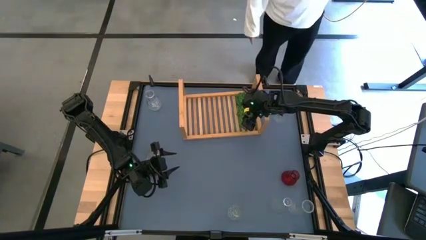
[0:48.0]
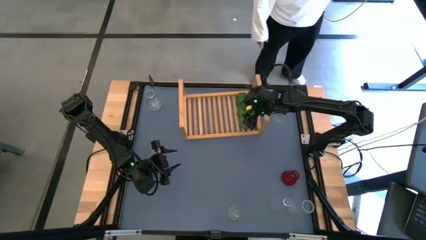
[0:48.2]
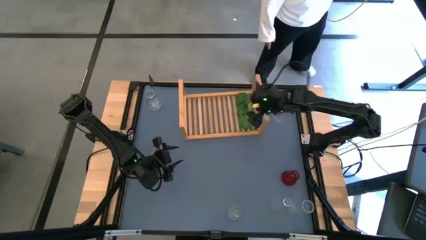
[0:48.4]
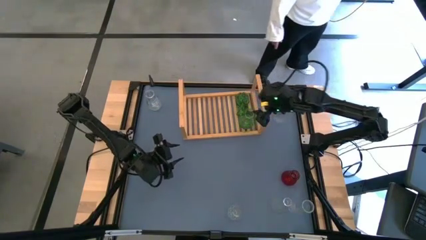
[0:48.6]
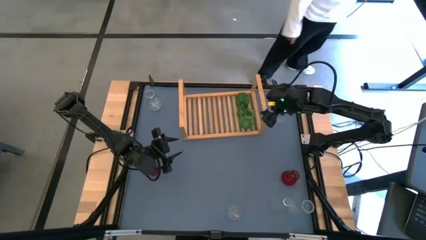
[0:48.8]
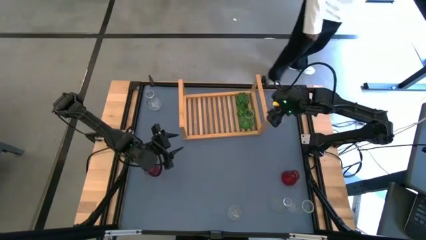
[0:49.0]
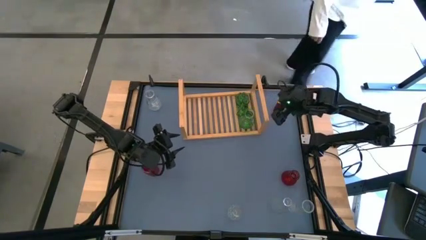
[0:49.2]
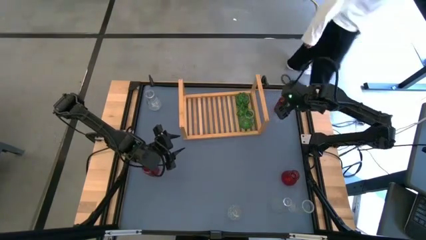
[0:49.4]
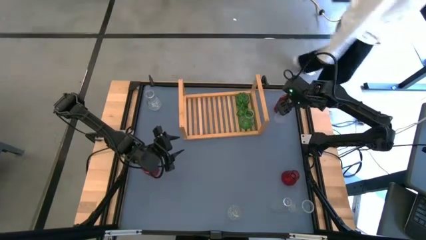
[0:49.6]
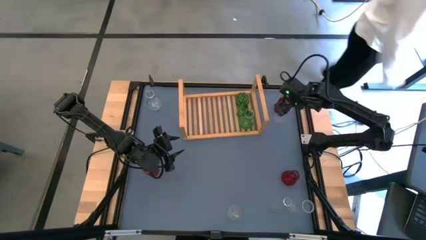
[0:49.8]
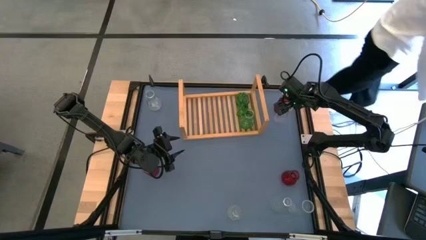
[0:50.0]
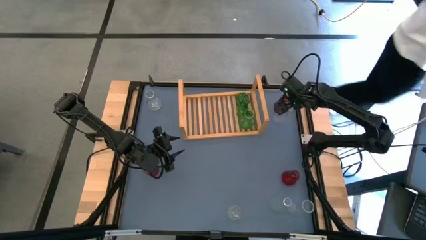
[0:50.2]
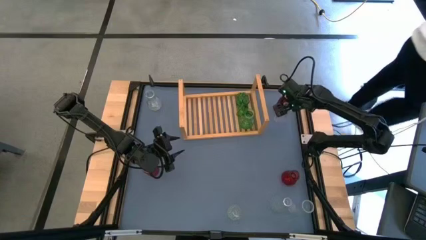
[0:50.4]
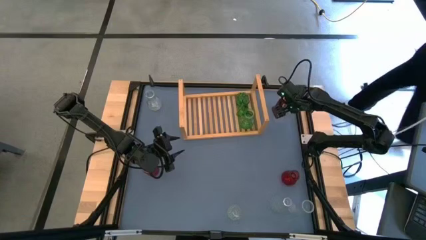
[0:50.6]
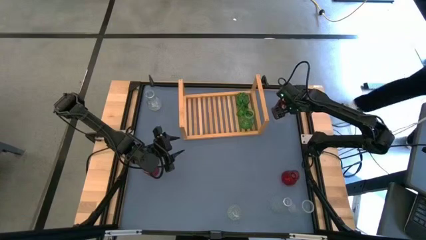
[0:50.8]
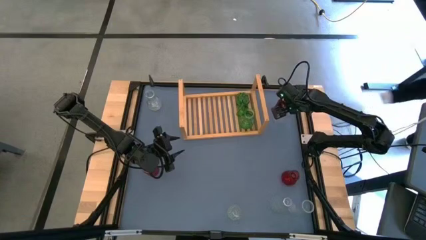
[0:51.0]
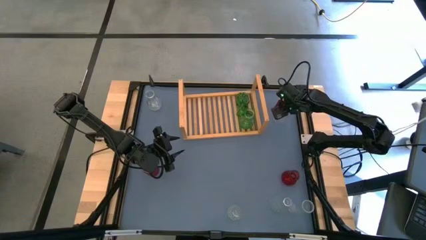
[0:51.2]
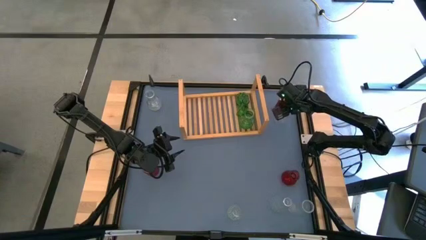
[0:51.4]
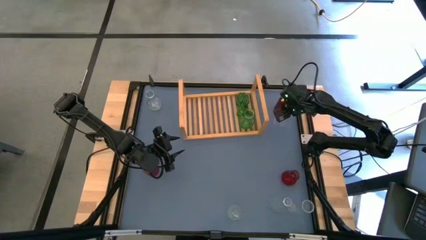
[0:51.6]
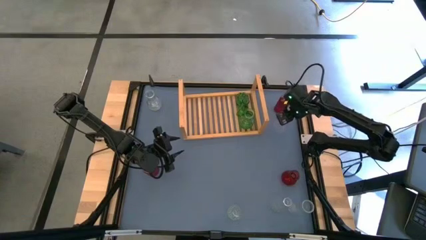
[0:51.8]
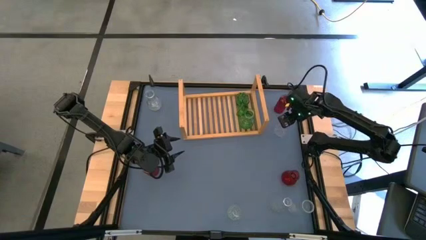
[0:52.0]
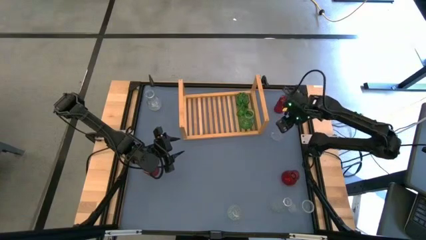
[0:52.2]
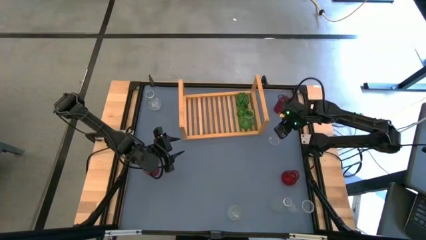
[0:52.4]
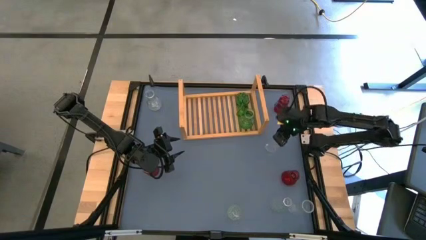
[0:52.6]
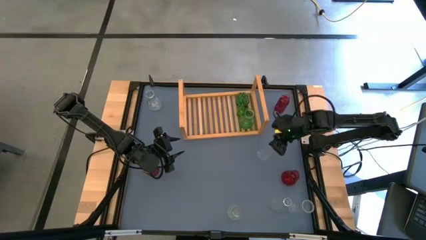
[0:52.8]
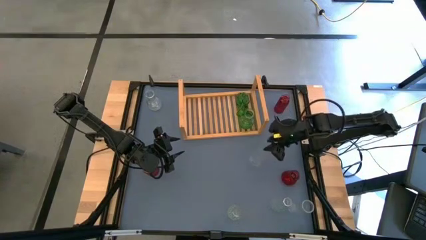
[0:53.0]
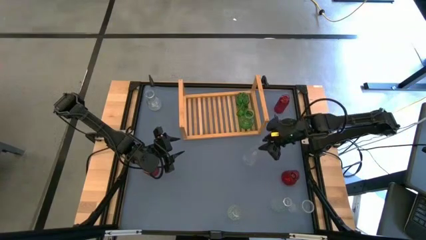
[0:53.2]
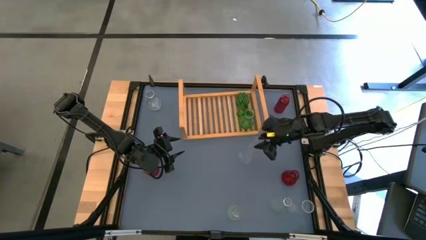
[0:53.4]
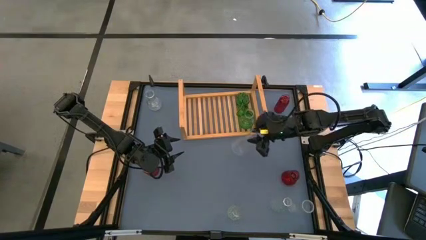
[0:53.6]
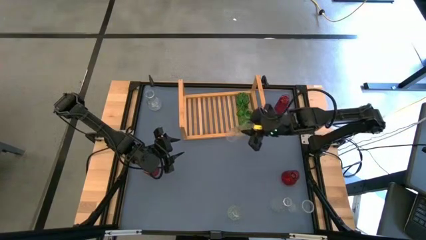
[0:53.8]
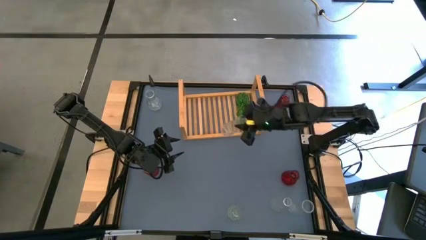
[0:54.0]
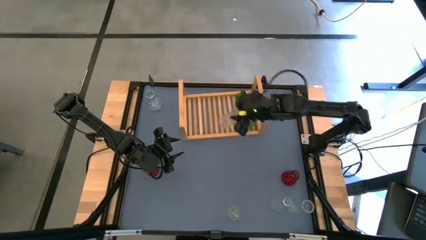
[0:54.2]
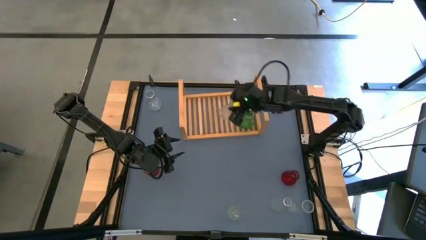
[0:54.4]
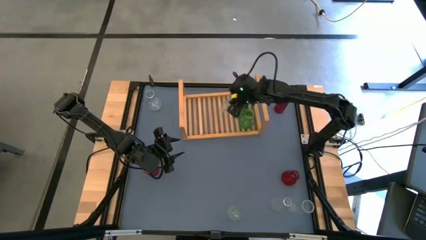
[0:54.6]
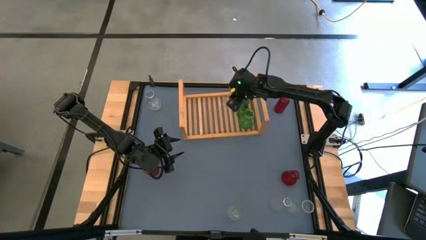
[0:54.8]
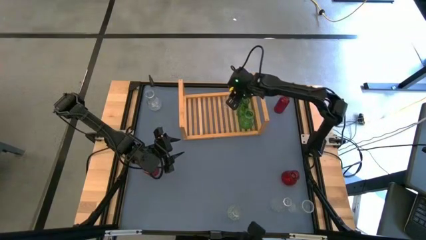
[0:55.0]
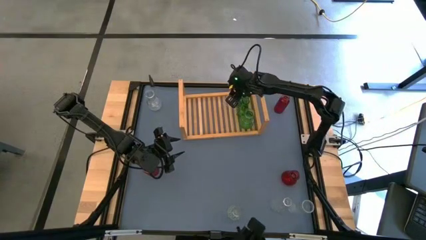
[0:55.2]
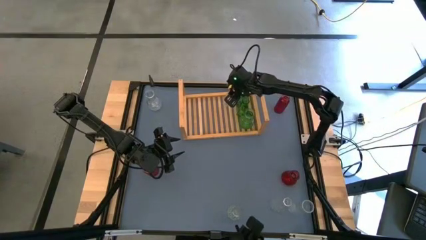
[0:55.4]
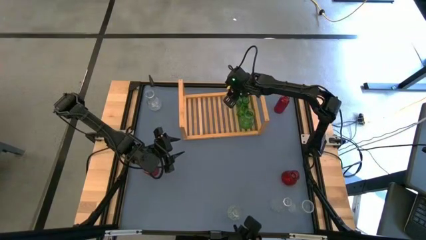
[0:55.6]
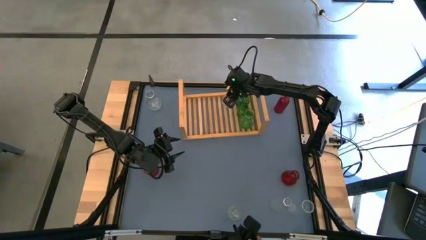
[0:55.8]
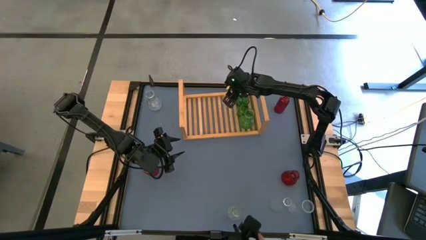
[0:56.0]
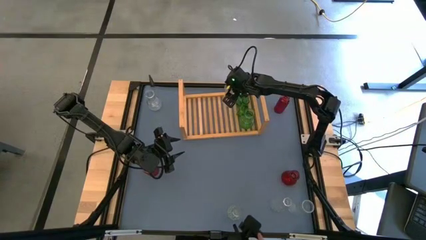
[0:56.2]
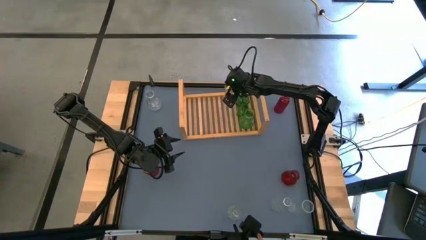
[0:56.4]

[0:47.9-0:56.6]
Task: sort vases onto shelf
Put the transparent vase on the shelf

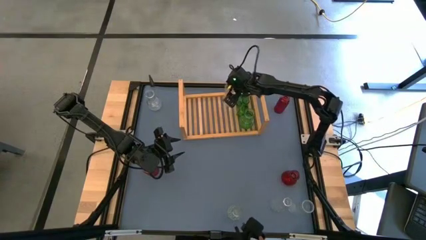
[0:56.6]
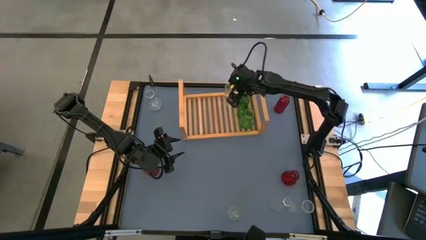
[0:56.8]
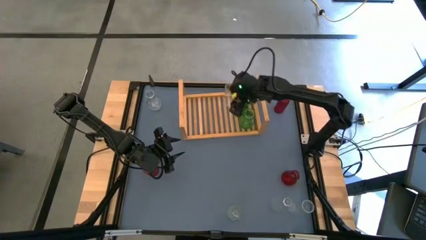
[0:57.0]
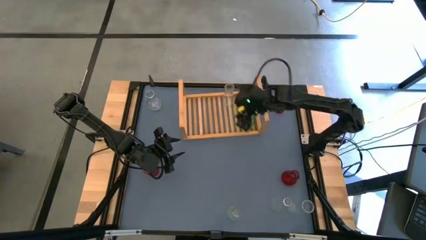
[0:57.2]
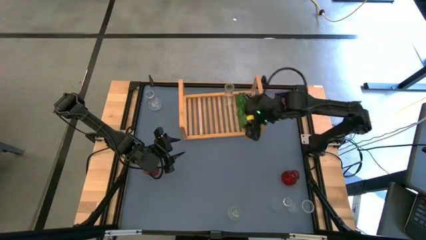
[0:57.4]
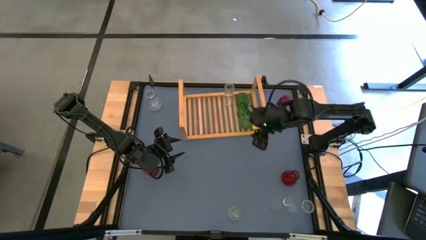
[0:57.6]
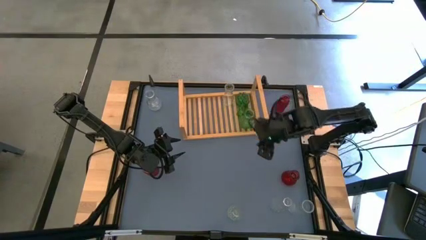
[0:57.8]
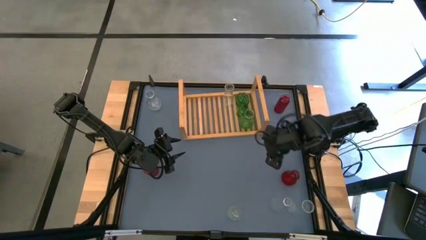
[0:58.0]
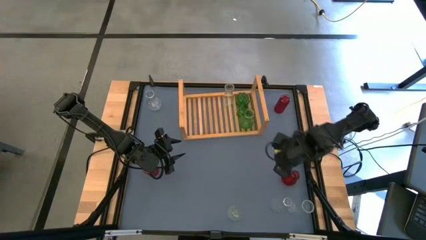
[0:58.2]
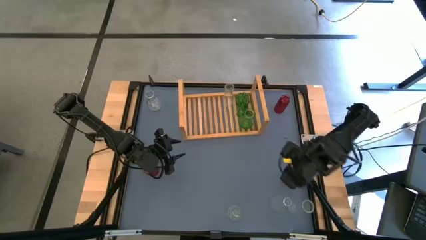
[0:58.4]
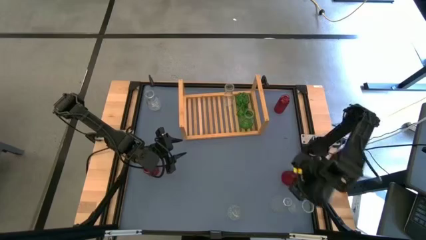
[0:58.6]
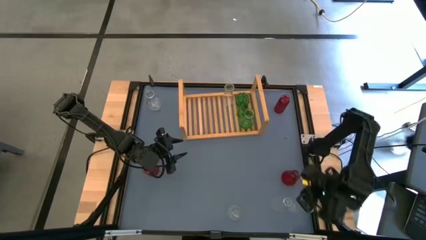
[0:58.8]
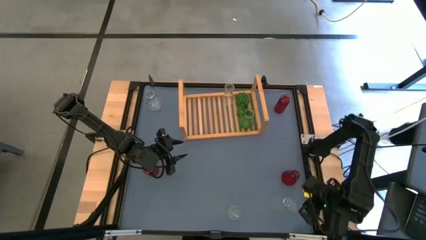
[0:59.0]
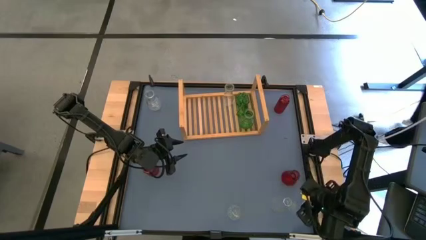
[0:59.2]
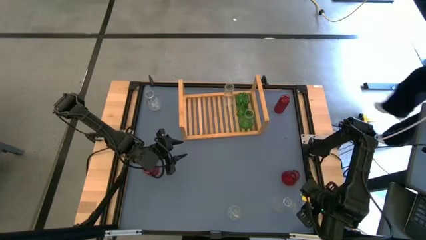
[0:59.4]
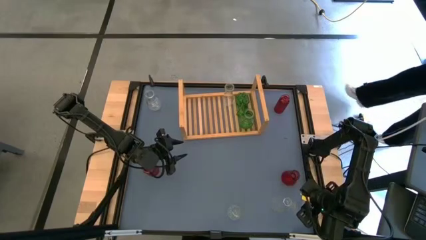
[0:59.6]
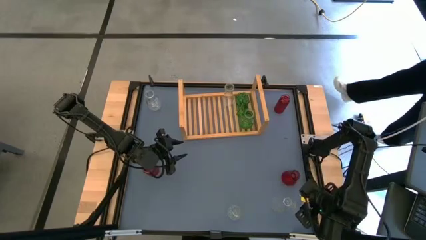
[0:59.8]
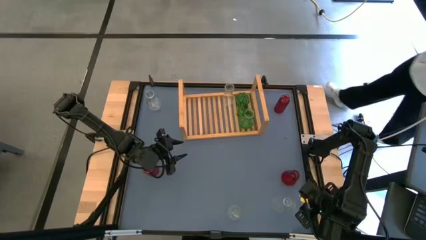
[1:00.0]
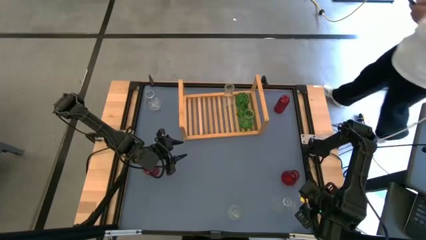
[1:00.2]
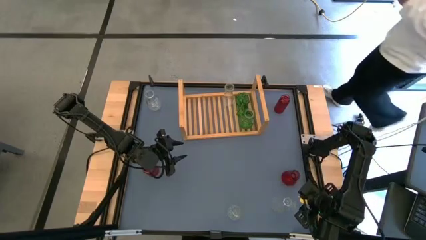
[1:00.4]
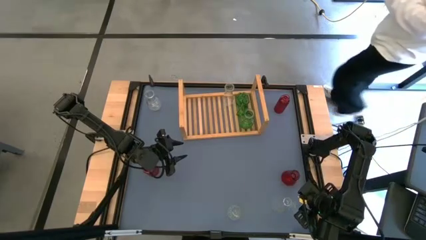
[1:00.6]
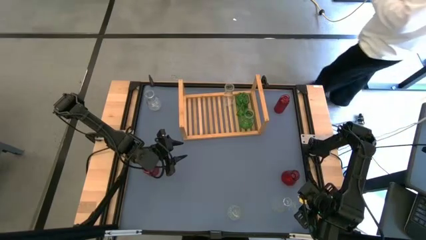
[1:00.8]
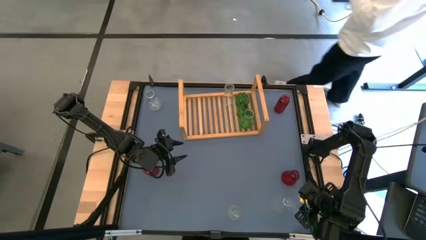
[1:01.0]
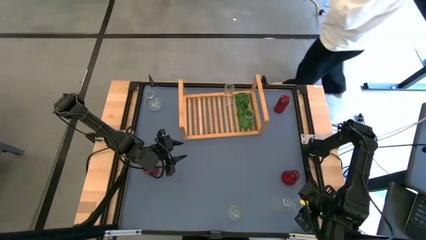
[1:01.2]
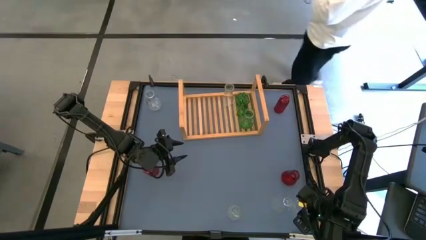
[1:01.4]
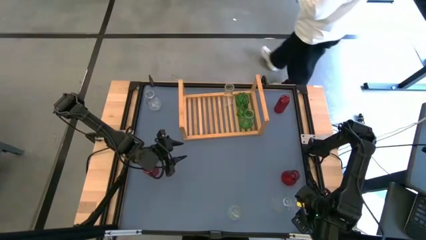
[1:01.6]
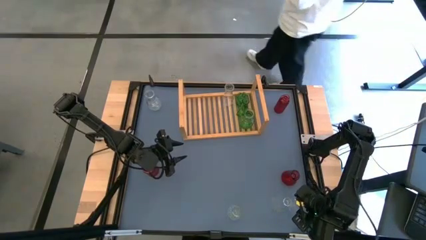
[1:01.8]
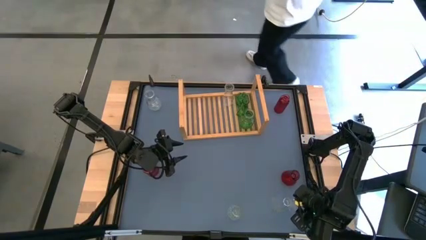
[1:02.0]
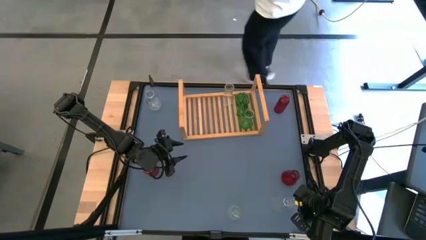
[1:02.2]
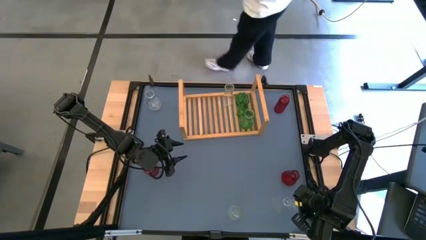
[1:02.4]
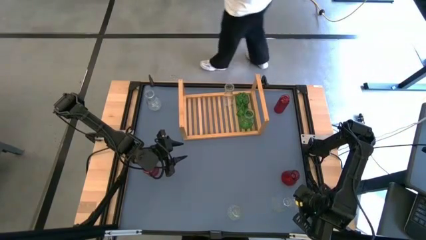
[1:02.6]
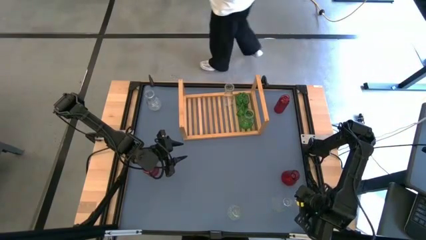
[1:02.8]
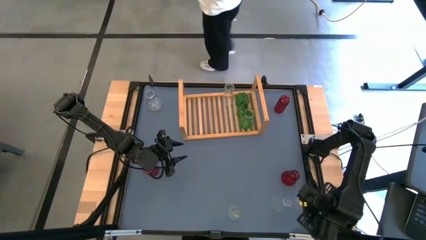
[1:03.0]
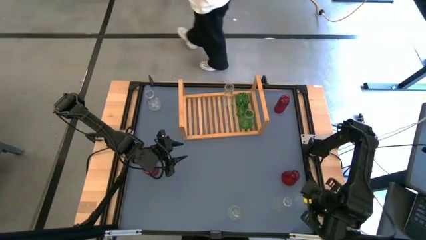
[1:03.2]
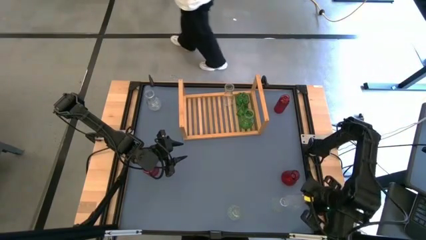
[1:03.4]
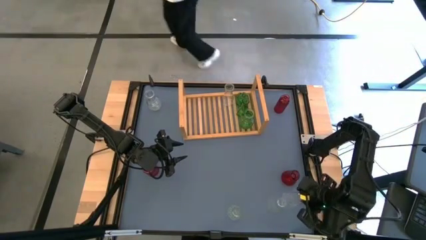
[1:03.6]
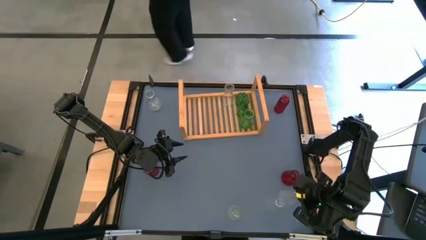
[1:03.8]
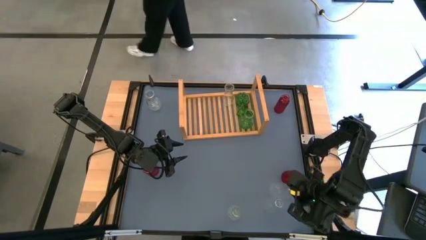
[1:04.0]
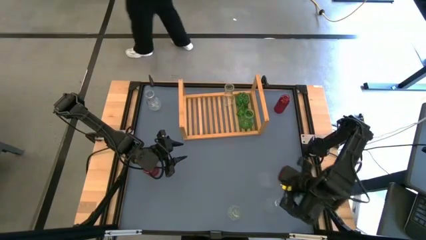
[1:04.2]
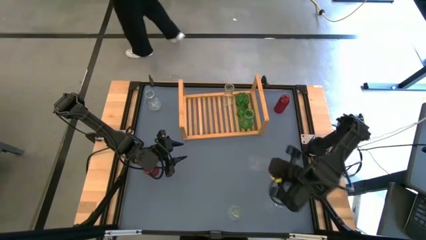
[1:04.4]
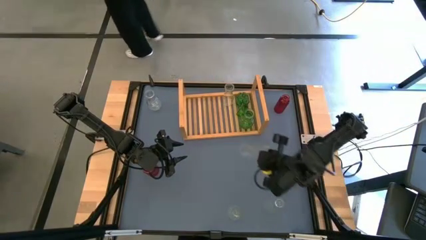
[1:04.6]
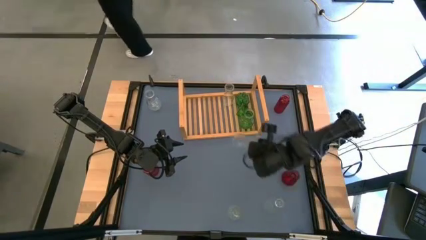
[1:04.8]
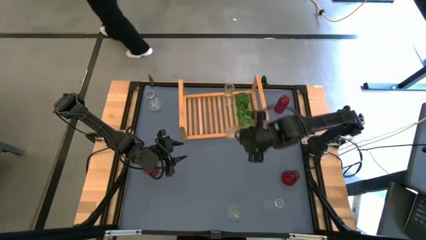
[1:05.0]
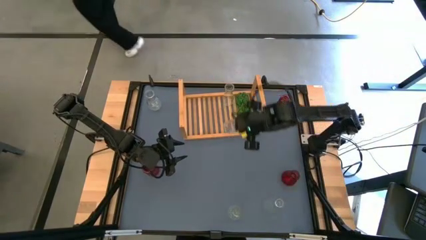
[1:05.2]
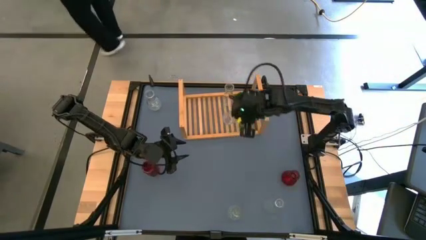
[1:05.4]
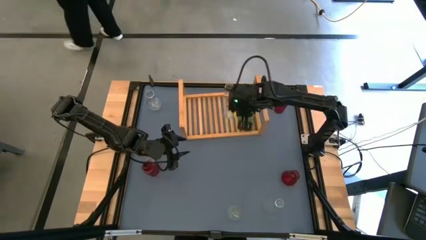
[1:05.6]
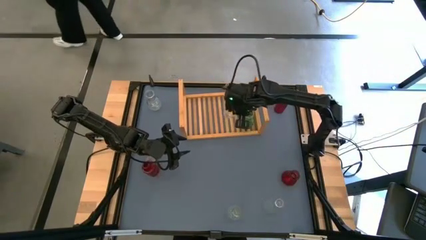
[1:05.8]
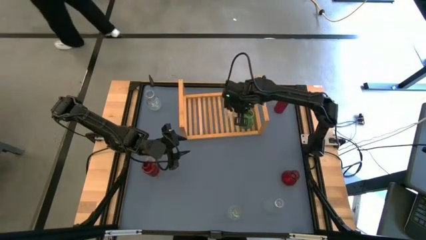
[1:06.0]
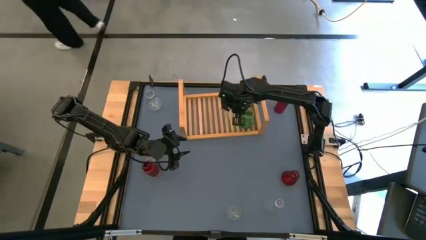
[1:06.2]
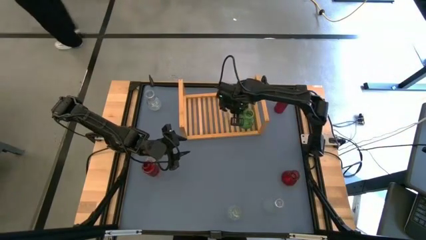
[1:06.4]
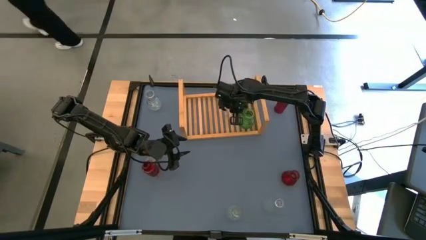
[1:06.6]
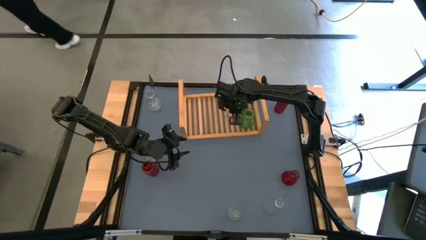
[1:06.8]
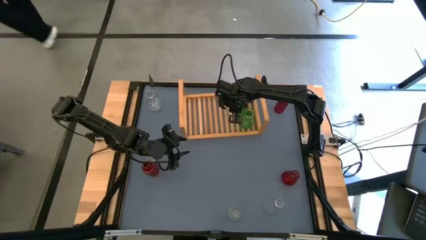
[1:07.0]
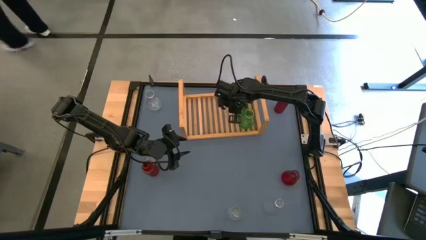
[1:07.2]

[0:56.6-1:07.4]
Put the transparent vase on the shelf aligned with the other transparent vase
